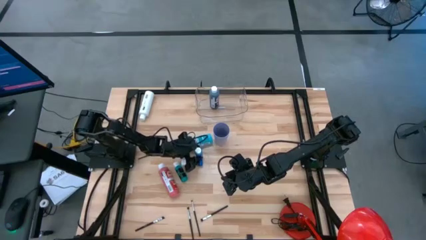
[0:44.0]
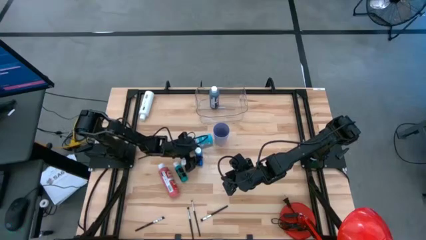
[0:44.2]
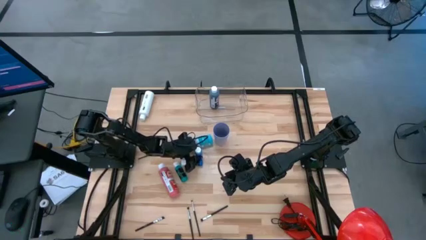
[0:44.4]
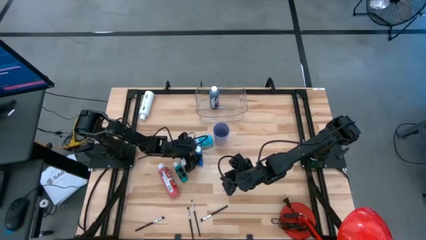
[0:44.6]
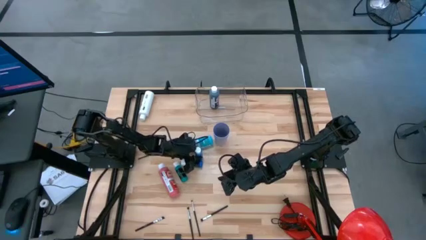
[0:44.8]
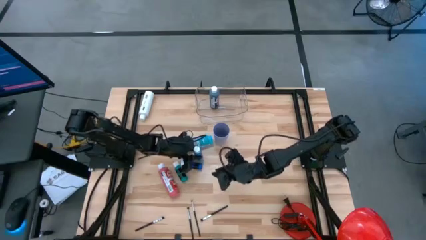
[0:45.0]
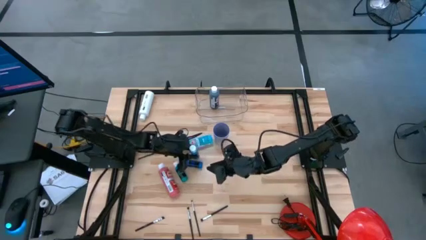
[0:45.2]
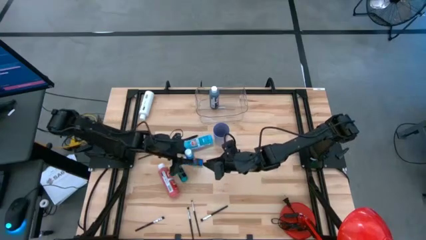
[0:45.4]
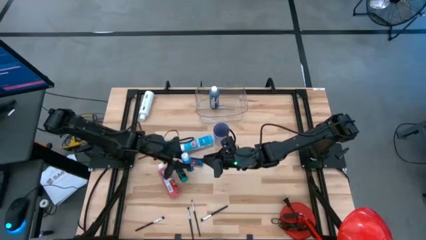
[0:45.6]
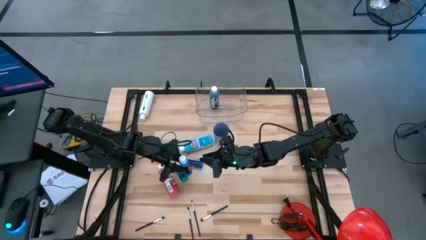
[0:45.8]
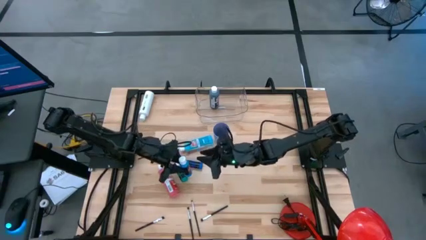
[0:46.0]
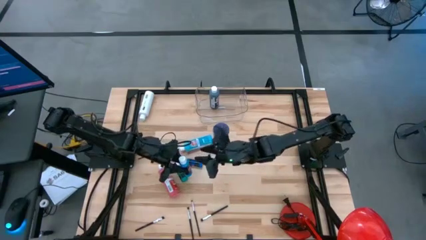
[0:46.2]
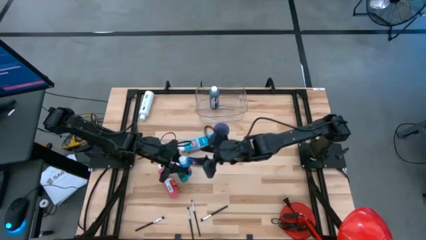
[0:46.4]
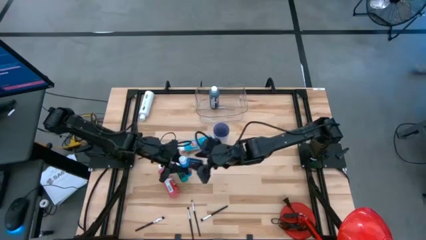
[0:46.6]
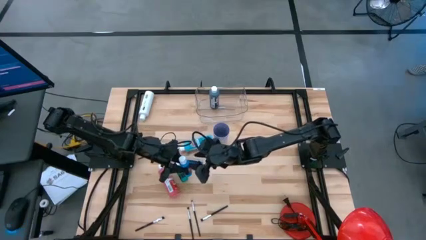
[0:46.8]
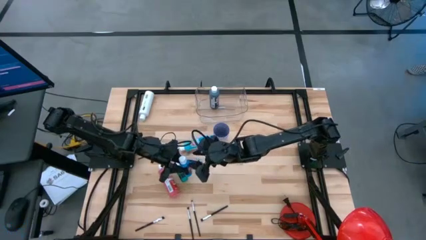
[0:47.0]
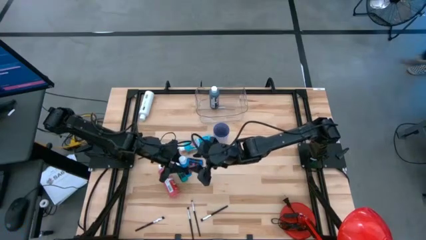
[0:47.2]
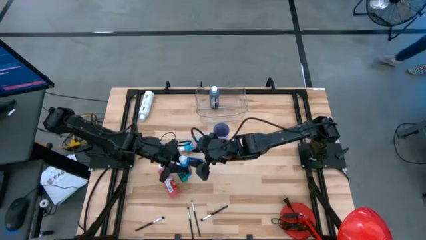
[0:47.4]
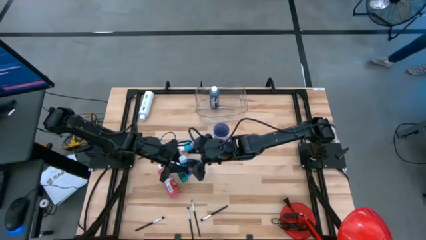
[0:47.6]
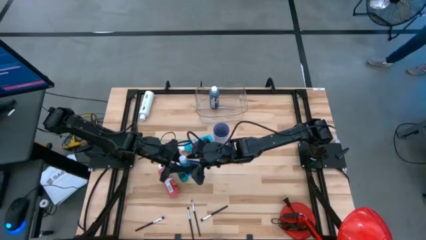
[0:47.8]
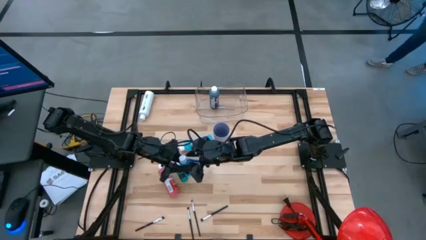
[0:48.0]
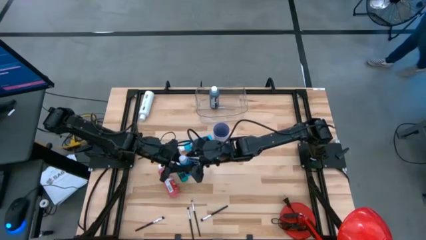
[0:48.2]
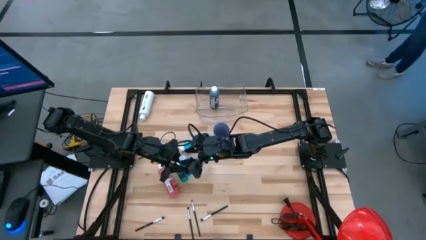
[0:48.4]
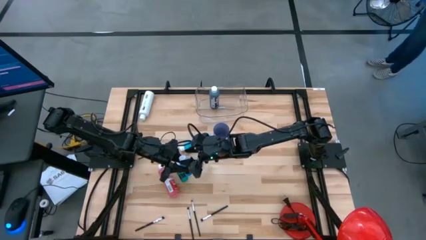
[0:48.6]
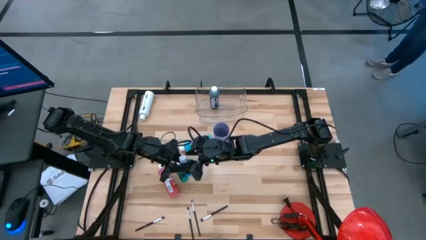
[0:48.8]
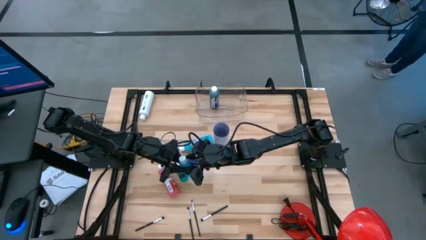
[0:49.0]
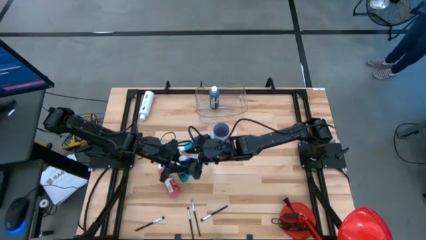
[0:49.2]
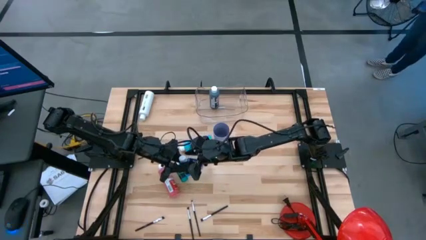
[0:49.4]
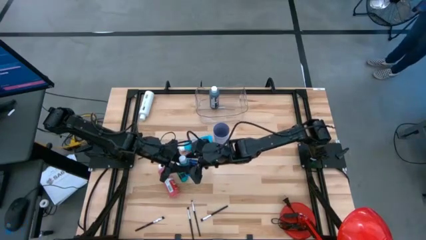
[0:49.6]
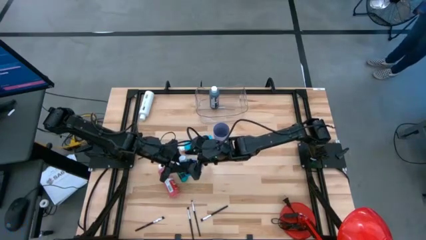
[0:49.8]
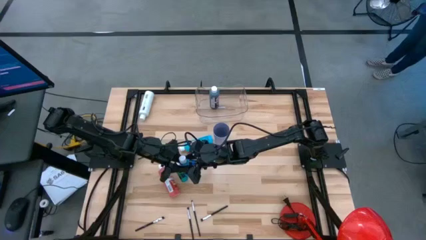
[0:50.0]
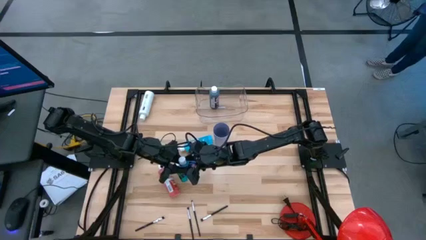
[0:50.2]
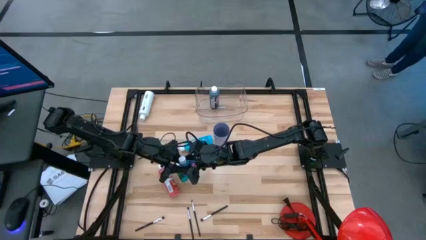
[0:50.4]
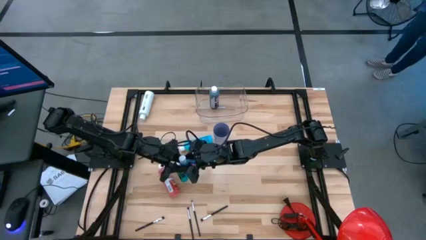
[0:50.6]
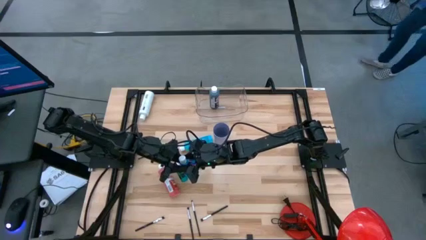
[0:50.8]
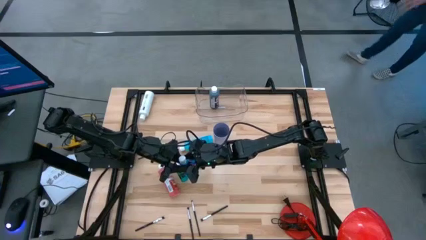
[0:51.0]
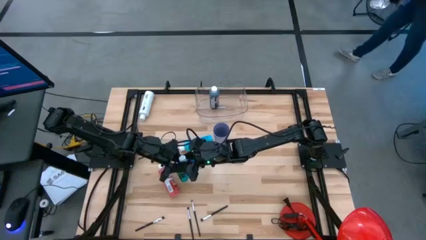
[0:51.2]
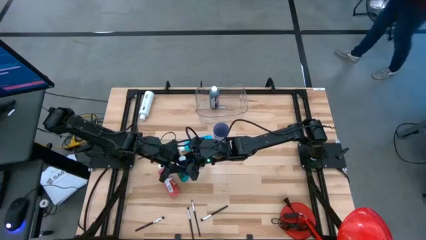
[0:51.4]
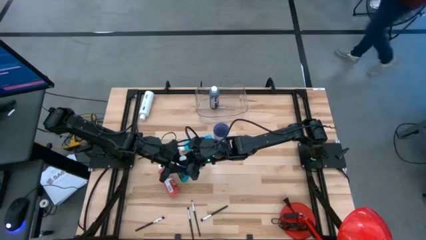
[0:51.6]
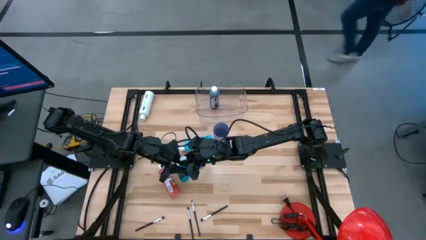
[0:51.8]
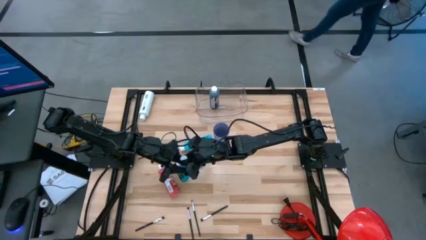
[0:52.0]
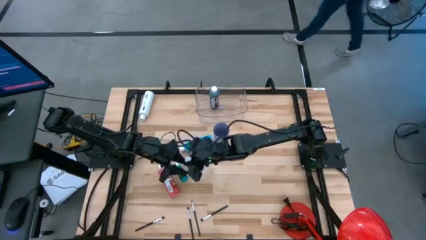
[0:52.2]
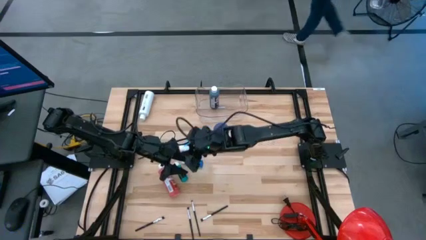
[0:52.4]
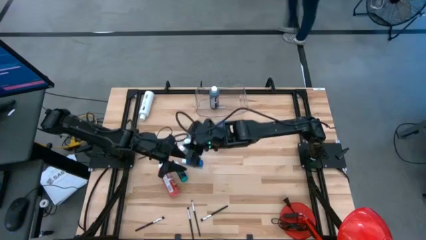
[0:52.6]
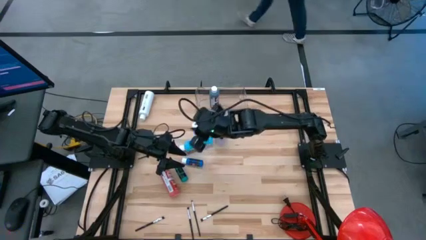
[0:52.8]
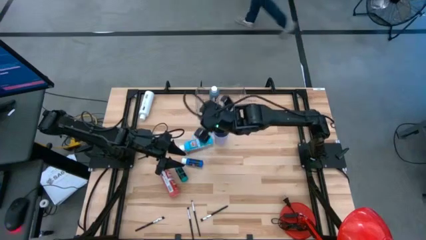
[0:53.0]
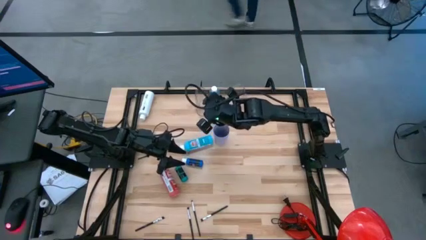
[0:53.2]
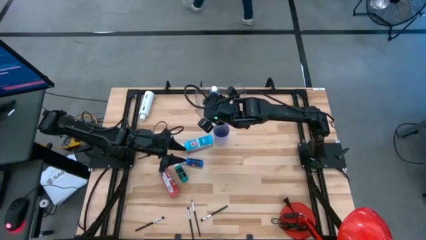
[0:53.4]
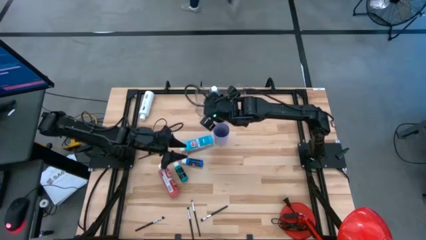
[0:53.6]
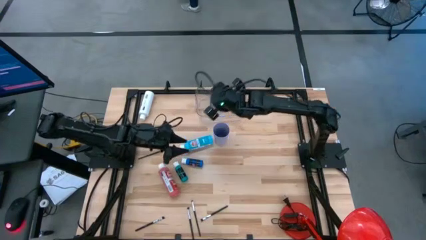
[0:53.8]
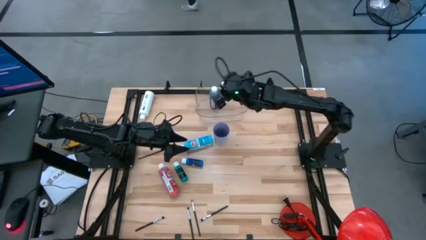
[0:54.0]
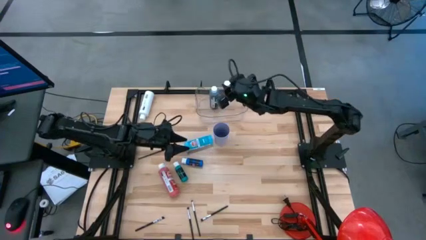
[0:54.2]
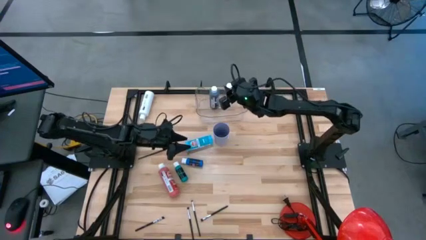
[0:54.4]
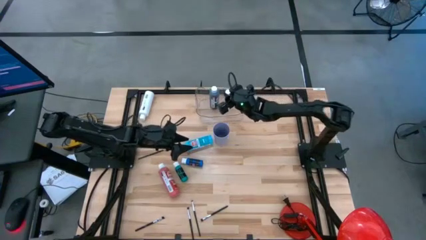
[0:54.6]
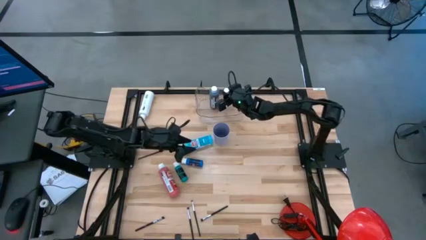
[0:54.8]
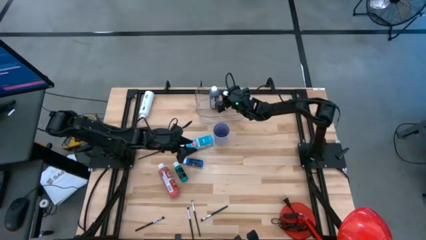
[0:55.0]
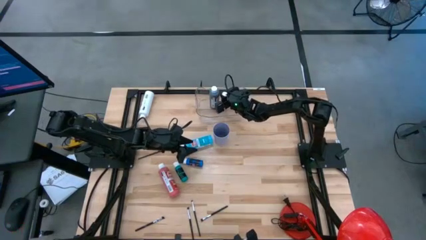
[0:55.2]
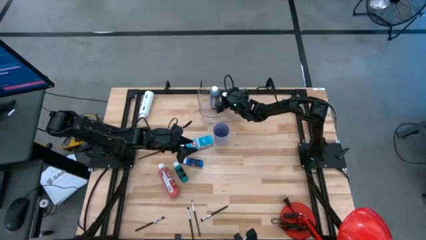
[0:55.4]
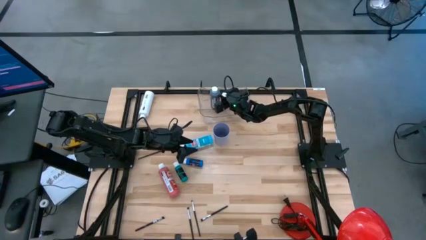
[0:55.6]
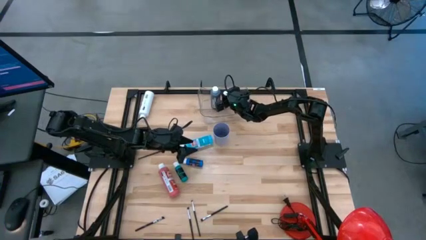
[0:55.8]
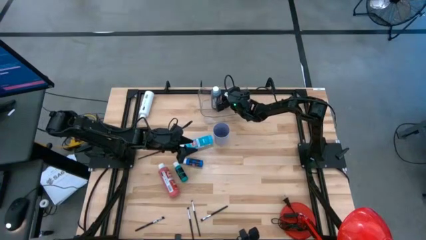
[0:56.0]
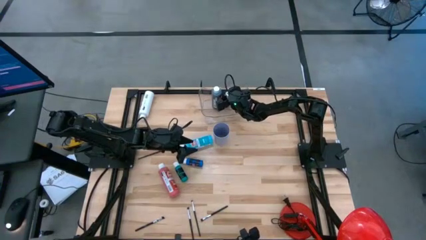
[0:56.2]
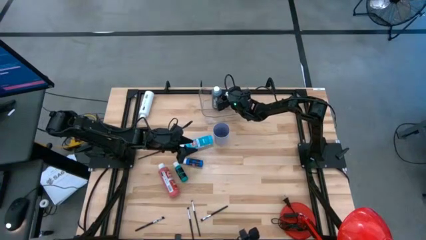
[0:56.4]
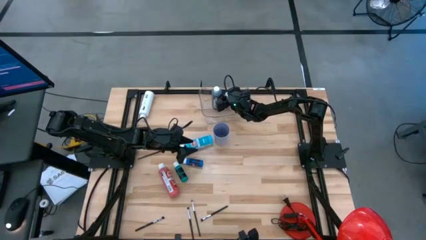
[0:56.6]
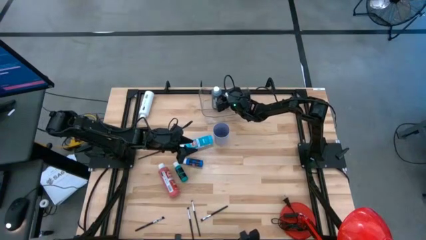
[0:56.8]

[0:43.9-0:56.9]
Task: Pick & Place Paint Supplies
Put the blue paint bottle into the transparent bin

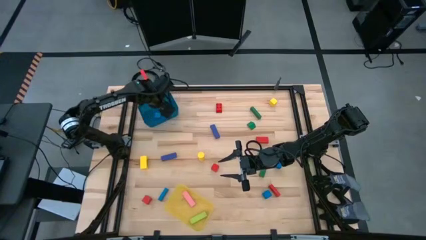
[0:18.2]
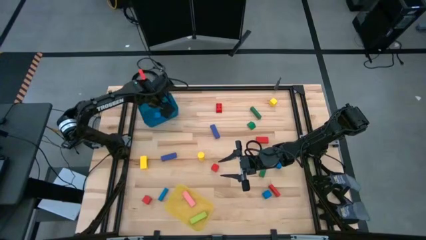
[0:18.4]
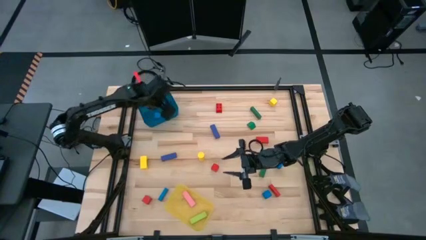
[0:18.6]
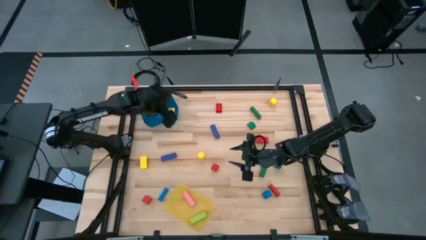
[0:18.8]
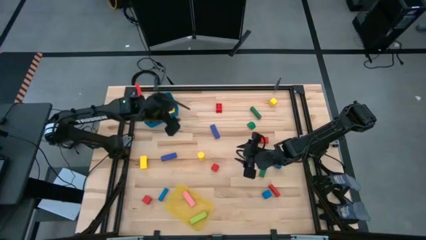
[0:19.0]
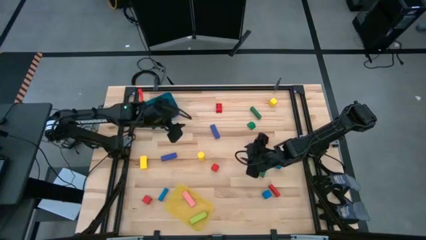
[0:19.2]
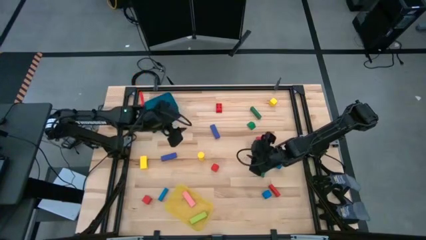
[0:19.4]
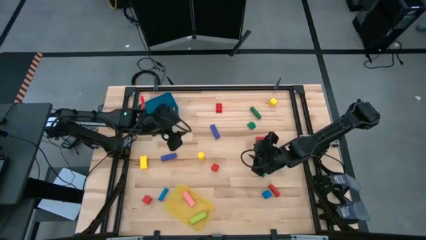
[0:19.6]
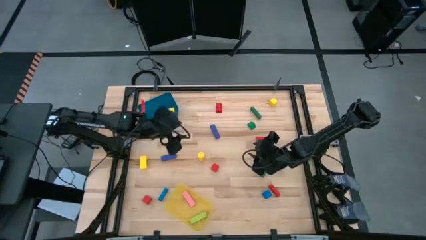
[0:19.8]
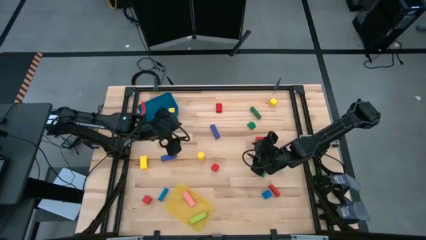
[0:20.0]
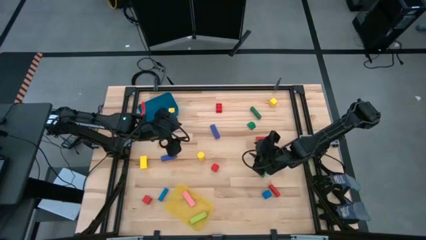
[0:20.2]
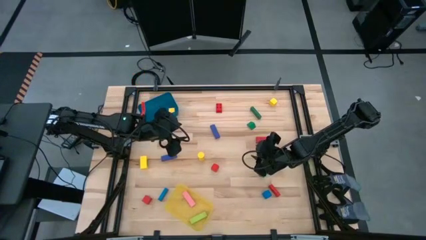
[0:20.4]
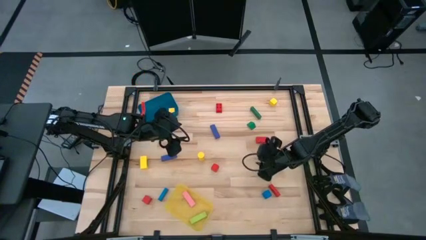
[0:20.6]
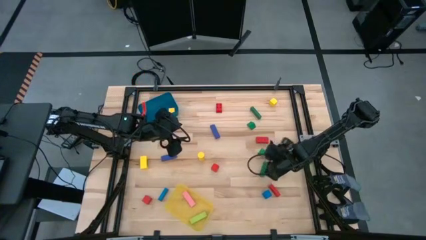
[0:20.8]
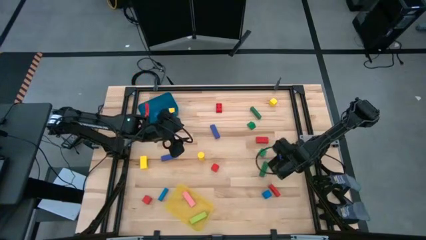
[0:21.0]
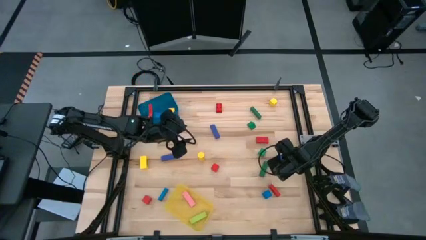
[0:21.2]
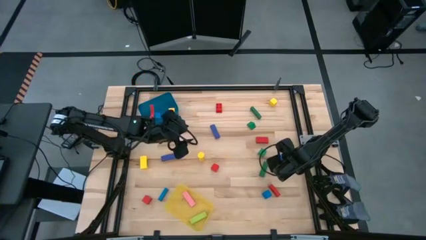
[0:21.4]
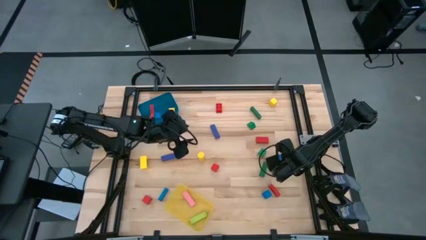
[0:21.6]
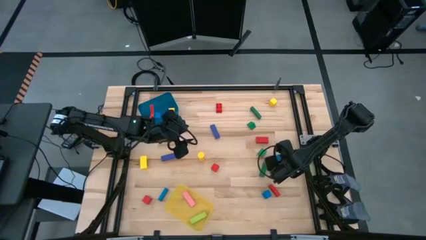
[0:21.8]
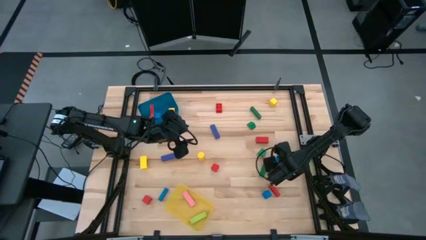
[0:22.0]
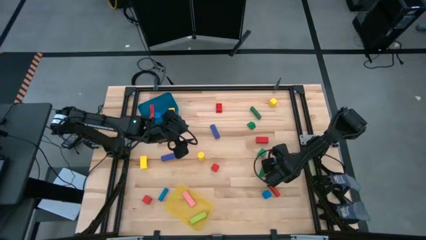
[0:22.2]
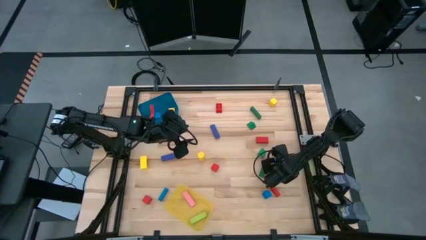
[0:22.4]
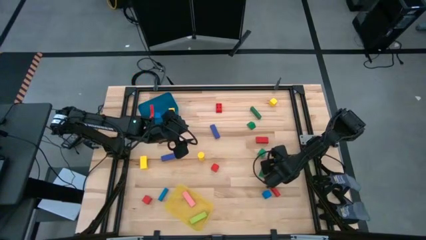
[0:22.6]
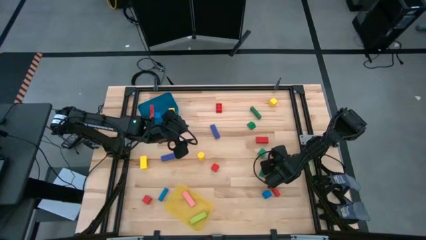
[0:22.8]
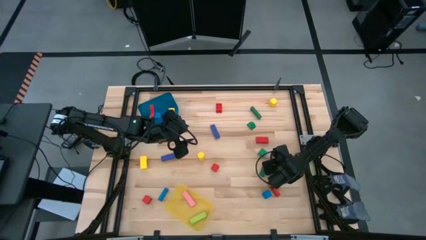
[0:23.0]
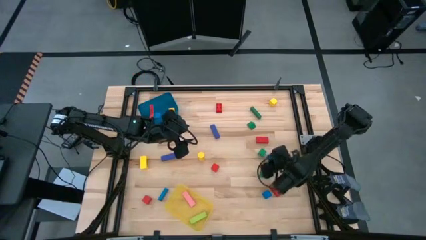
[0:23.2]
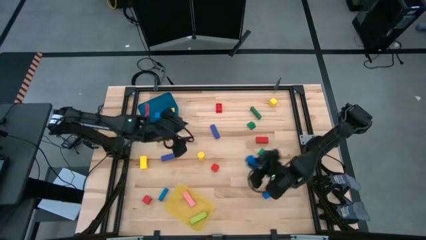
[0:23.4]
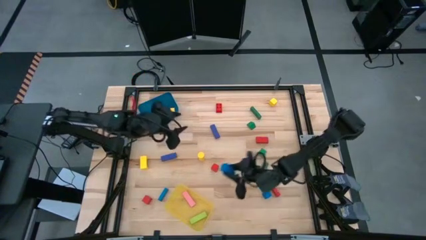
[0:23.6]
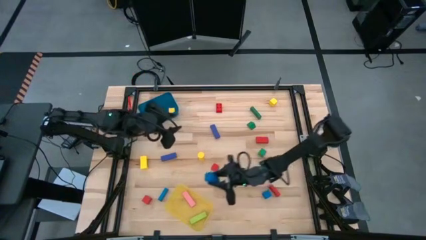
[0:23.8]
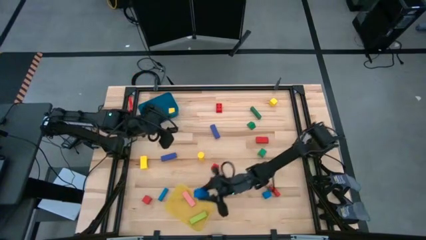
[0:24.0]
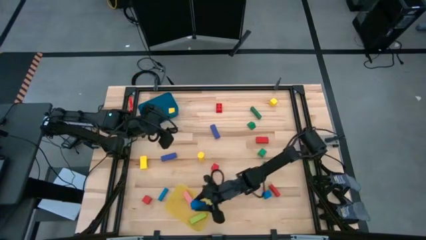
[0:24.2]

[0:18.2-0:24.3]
Task: Sort blocks by size
Put the top large blue block into the yellow bin
